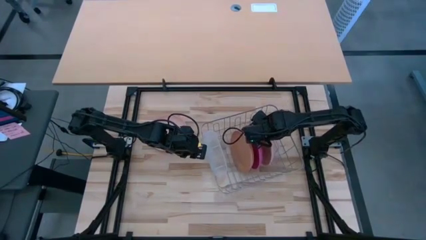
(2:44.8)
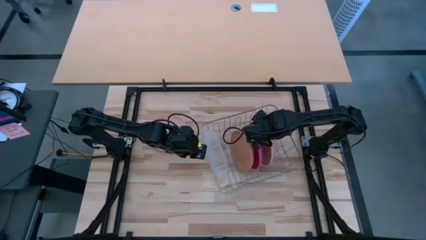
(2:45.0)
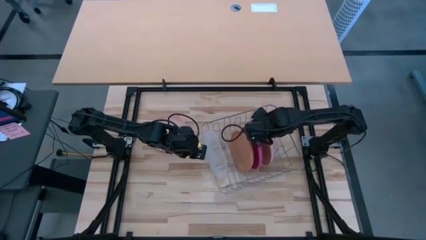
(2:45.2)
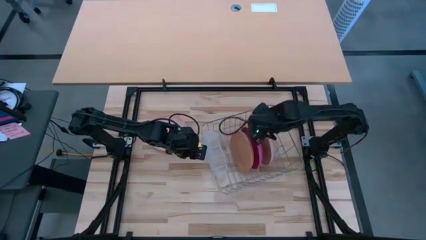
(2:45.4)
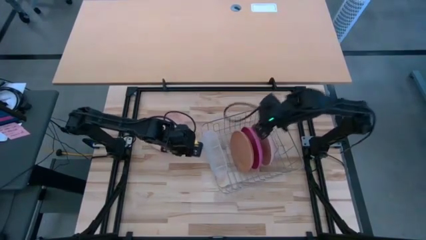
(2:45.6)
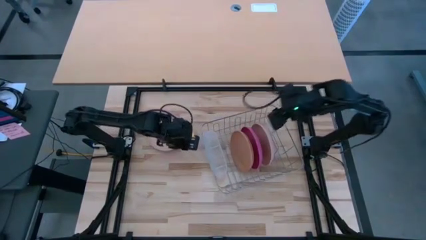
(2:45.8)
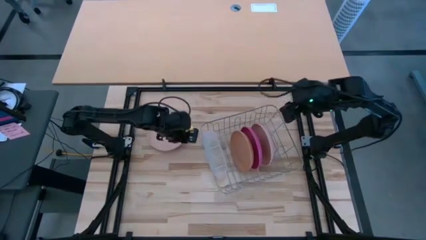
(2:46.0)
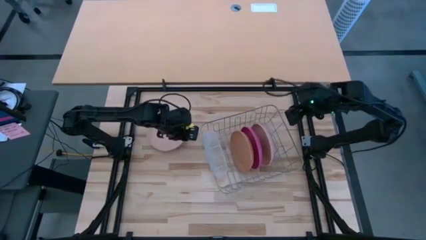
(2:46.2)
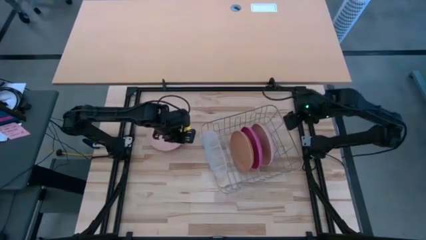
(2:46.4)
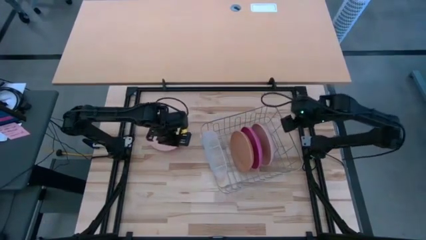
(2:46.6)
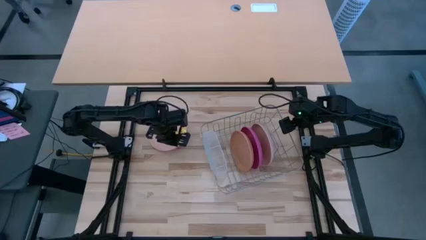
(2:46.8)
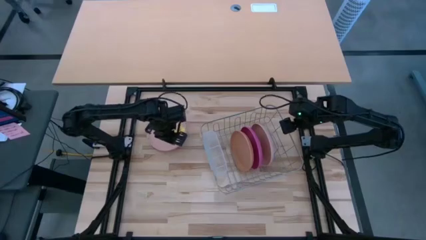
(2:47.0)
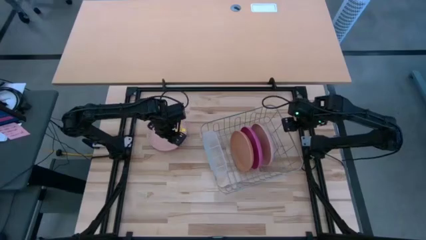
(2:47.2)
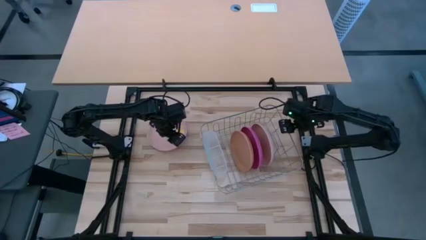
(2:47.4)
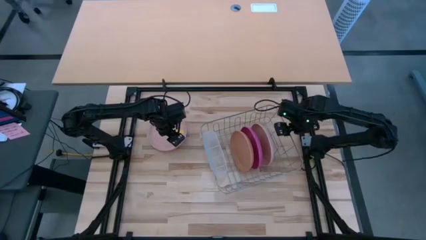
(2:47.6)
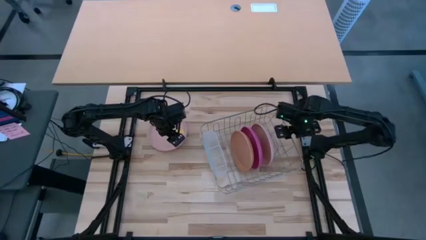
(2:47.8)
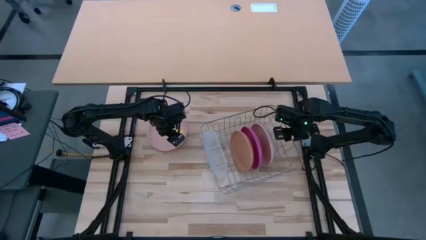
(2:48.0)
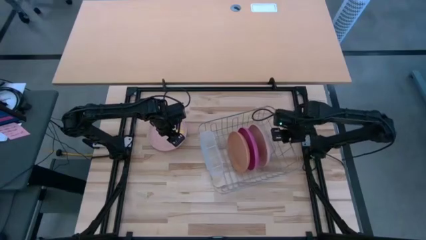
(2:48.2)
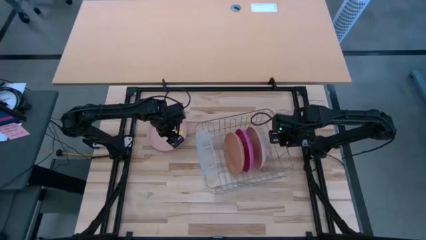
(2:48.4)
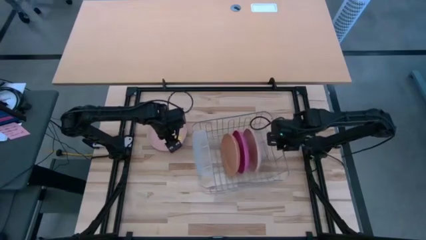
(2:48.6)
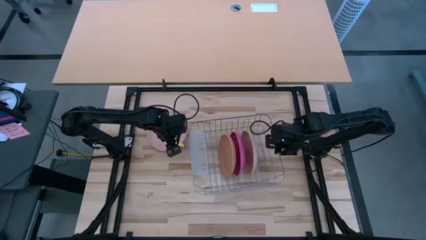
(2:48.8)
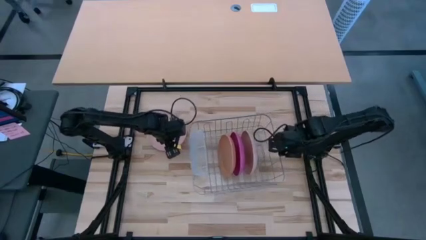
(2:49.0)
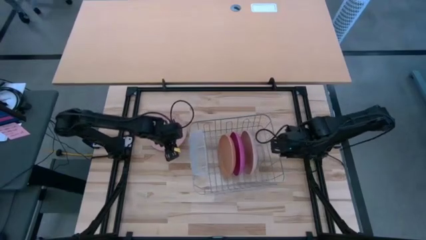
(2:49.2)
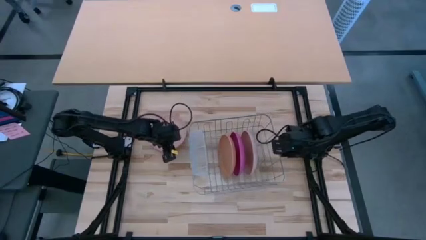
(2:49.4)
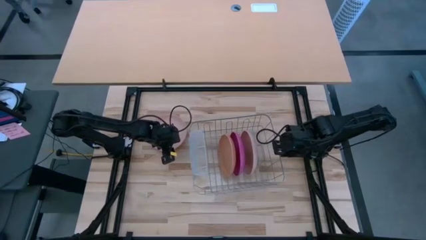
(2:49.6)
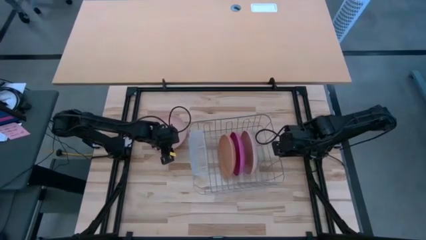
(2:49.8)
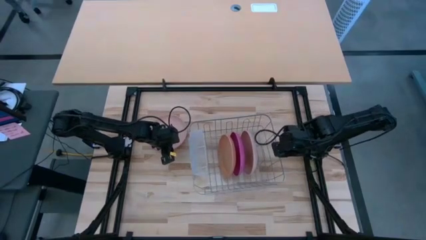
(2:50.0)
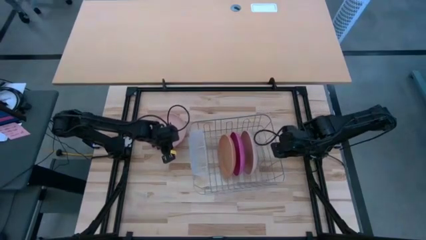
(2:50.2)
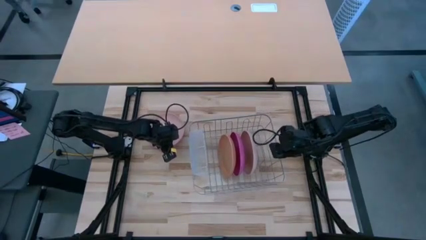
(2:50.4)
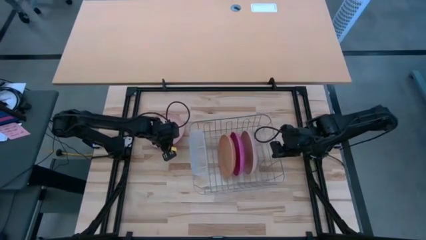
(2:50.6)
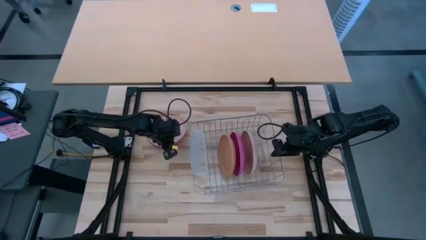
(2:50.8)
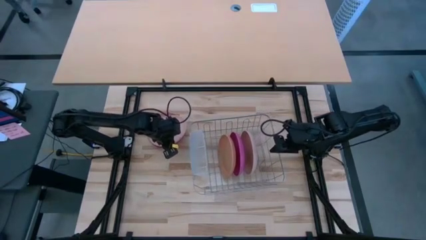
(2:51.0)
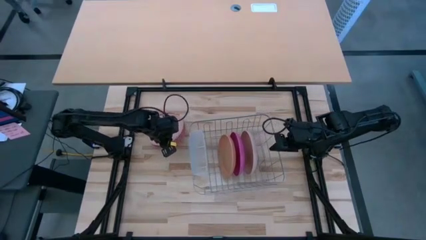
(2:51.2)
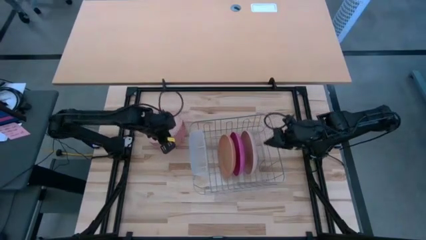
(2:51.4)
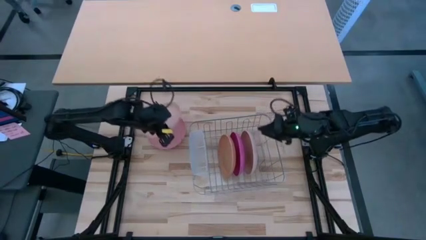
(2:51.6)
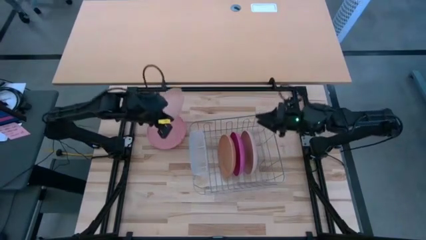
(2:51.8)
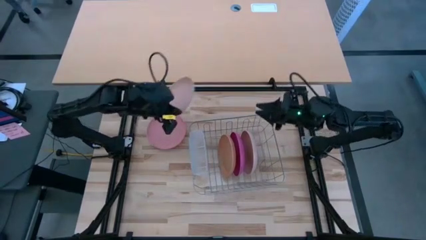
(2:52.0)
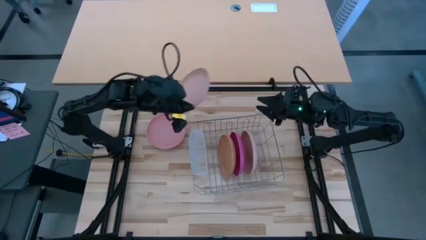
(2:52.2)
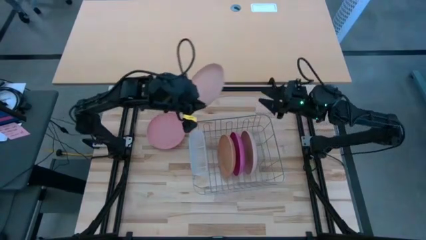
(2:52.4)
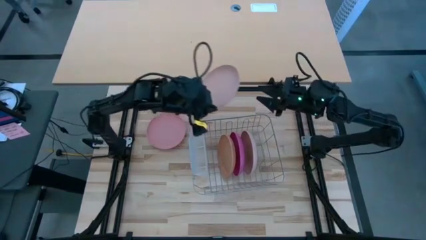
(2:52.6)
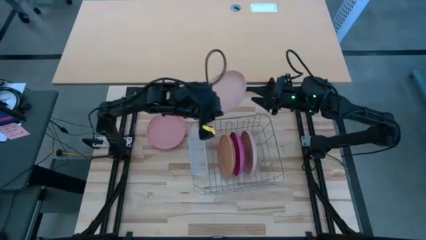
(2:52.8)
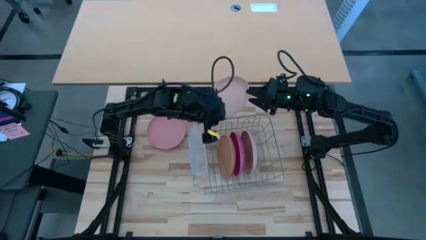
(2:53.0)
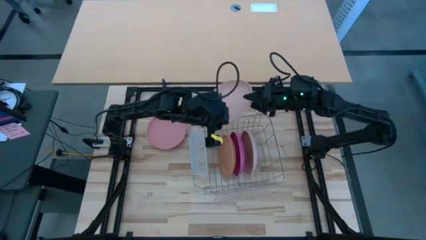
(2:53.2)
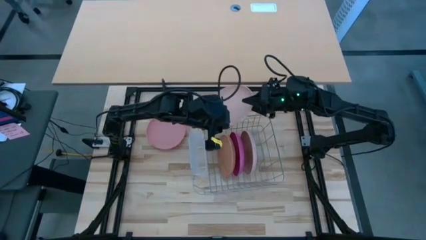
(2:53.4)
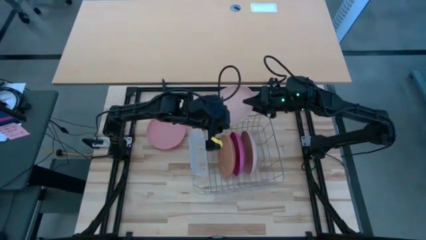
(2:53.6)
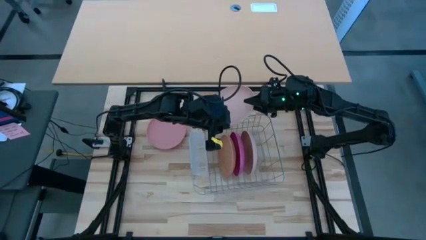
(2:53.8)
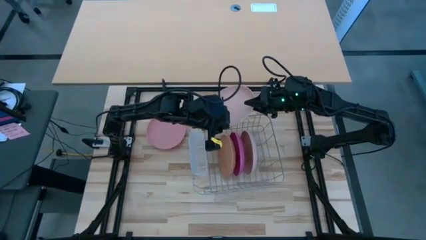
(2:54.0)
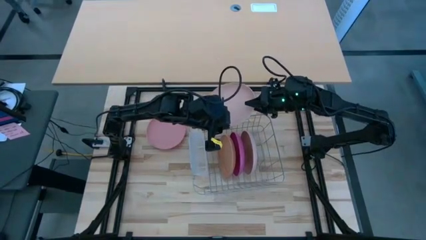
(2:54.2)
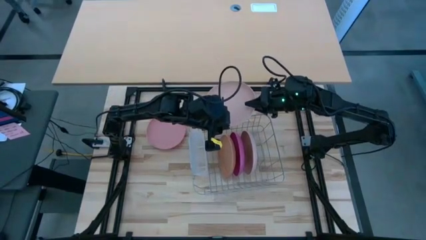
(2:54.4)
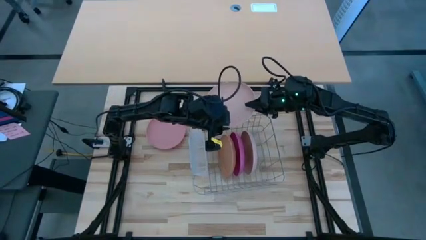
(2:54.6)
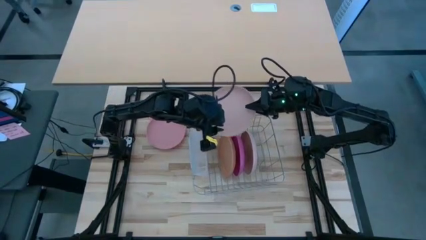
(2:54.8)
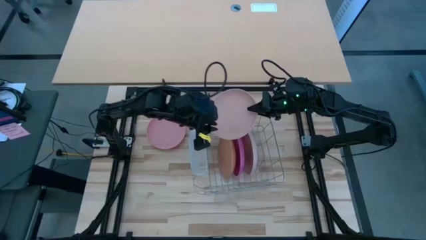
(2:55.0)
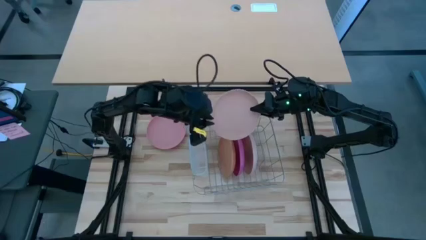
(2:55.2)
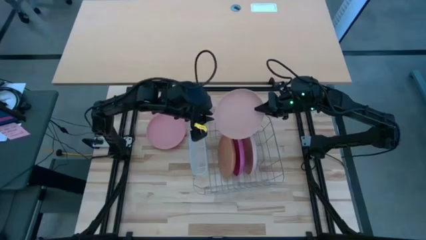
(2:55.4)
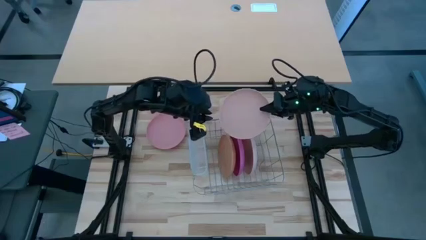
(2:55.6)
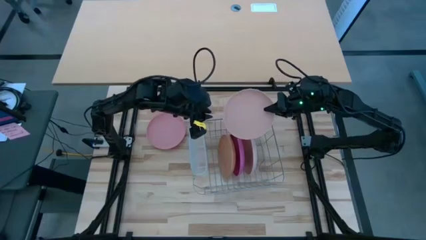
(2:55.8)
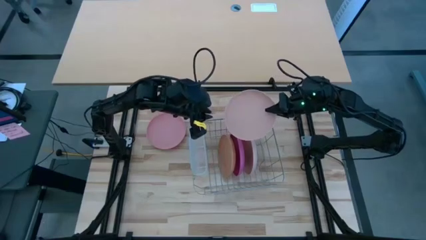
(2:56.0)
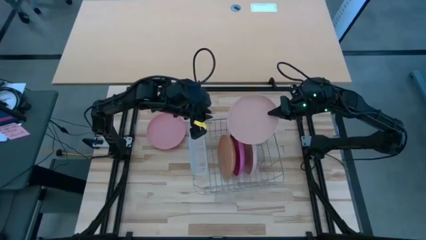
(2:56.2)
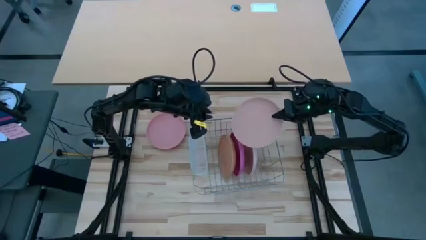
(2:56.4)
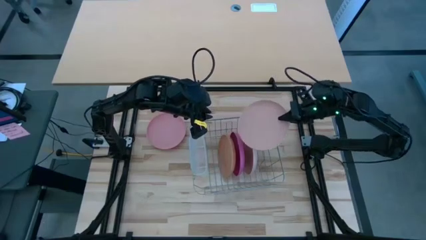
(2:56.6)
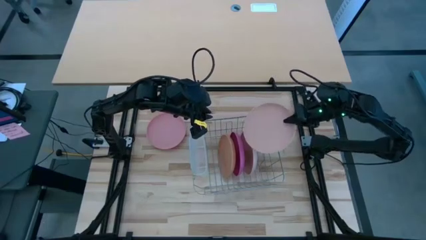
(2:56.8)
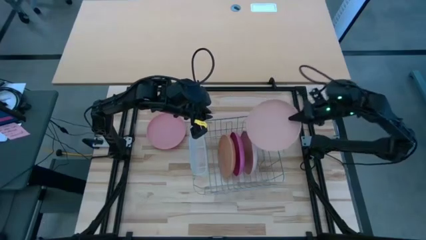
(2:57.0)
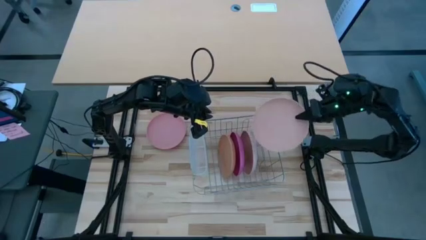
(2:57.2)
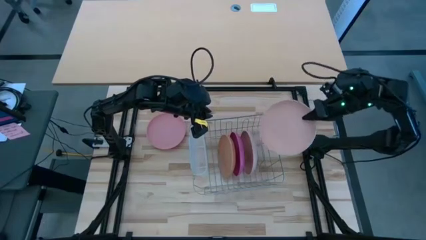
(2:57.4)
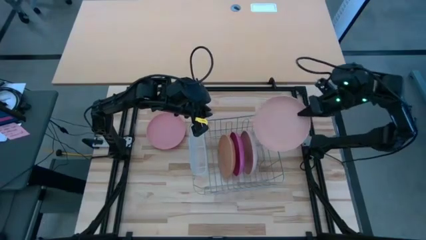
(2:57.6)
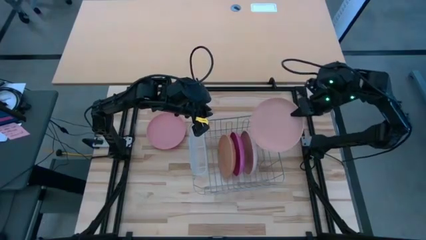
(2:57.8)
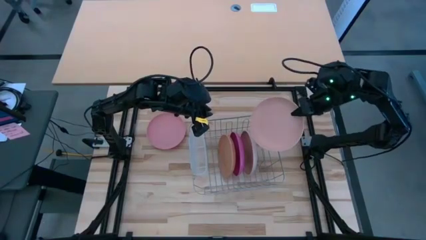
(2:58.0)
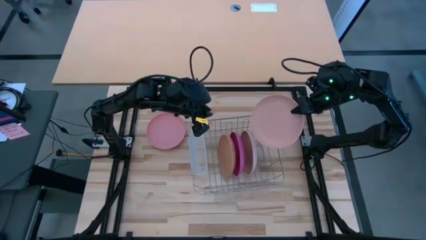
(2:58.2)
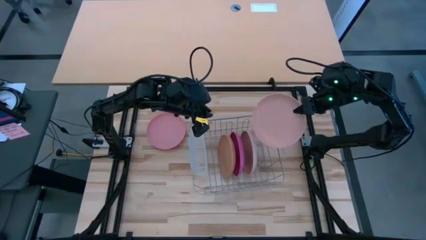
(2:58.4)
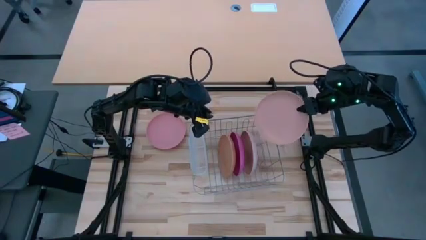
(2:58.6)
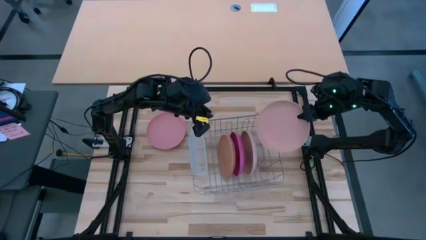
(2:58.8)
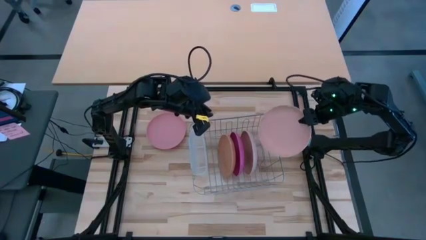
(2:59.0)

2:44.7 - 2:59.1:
Task: Sort dishes
Put the light orange plate in the dish rack

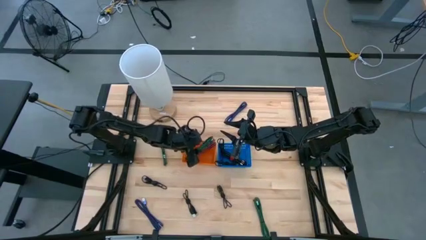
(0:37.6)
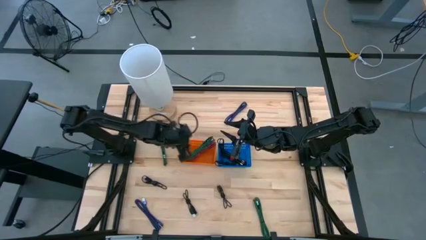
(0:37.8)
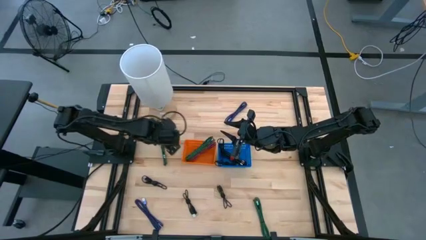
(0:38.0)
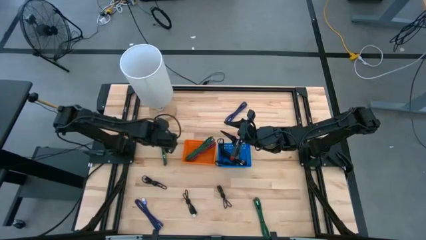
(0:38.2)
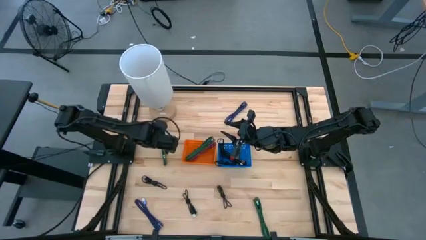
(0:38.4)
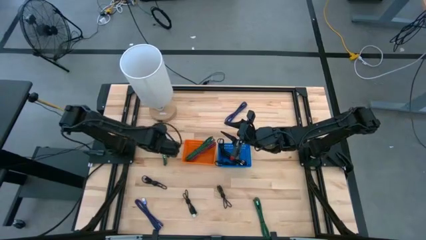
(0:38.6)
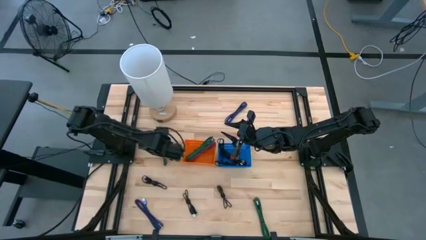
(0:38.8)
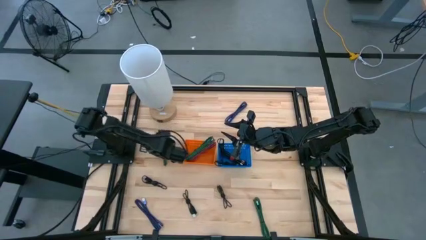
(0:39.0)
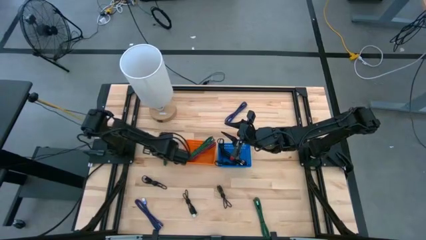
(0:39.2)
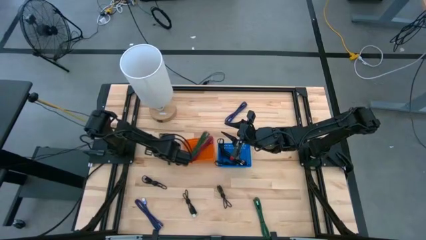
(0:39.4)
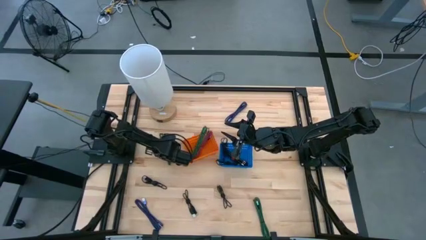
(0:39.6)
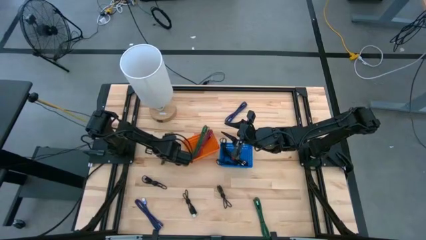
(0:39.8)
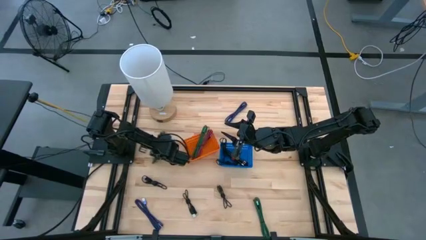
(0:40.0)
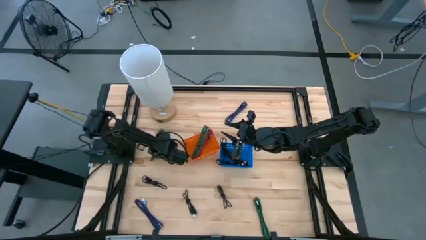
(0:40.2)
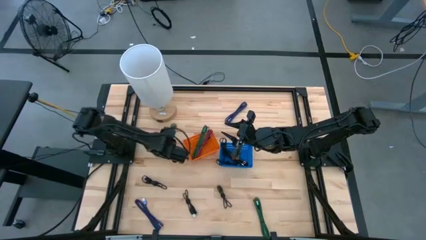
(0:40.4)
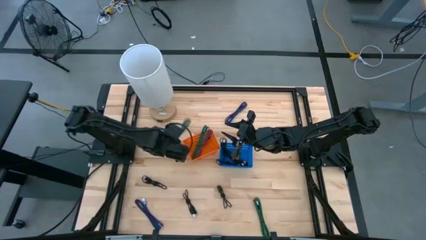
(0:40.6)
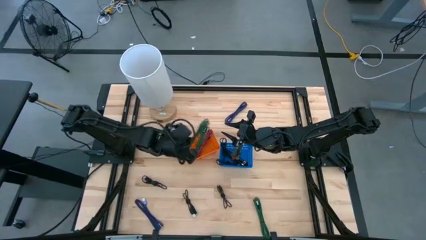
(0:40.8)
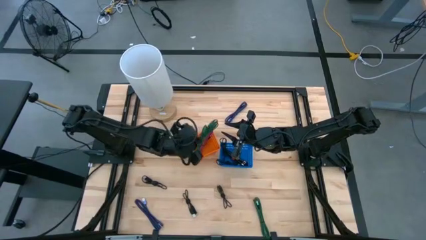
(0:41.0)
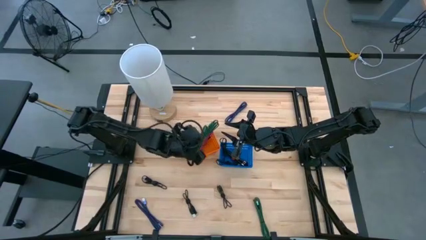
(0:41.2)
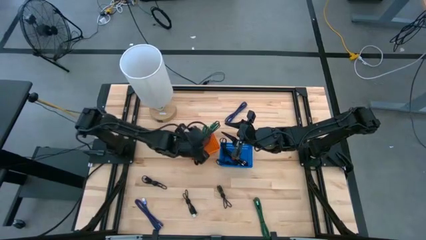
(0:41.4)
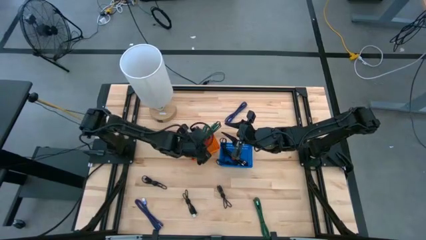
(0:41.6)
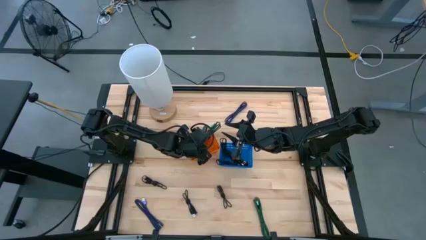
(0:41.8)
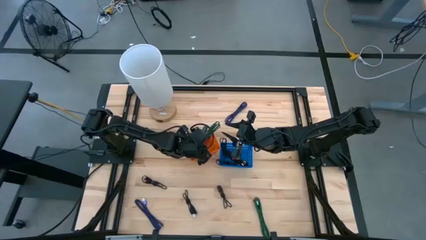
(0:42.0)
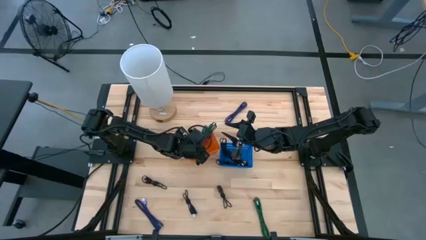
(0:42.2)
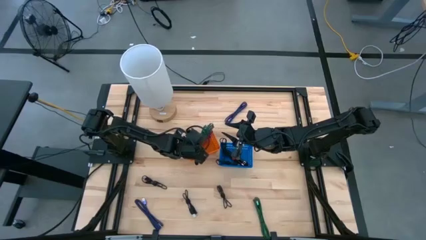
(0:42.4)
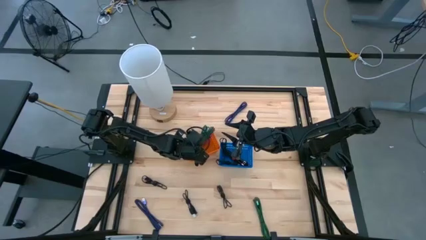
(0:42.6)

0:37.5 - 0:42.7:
Task: Pick & Place USB Port
Put the green charger cable into the orange bin
